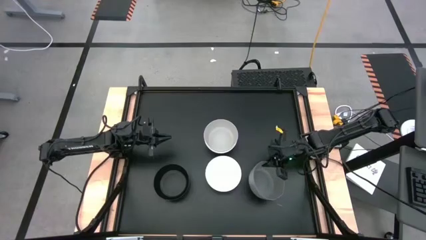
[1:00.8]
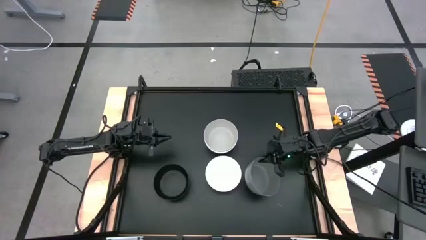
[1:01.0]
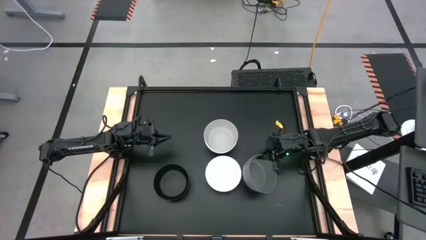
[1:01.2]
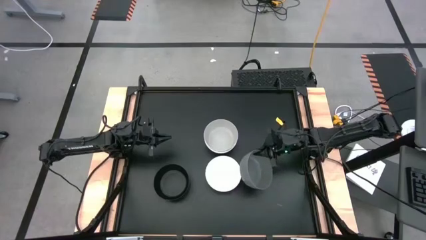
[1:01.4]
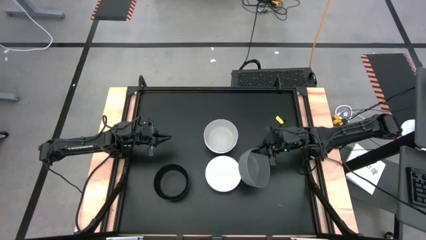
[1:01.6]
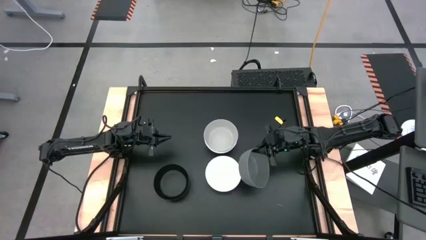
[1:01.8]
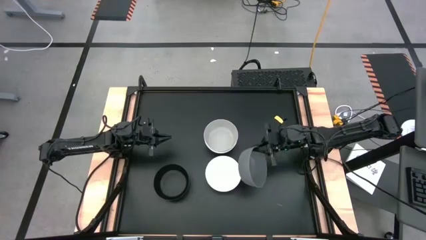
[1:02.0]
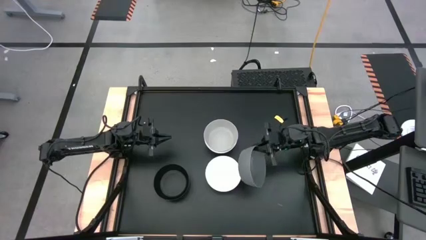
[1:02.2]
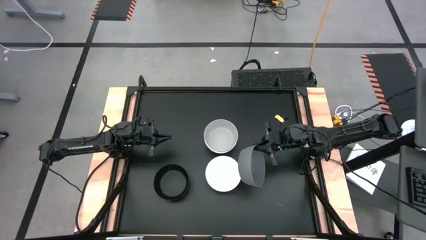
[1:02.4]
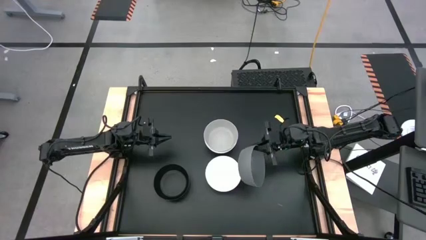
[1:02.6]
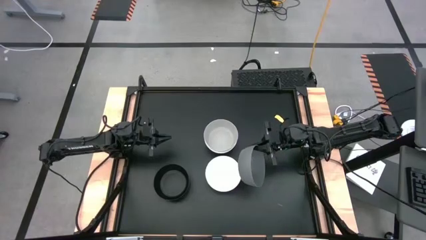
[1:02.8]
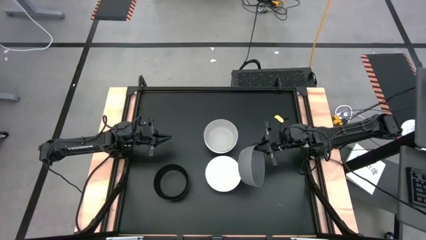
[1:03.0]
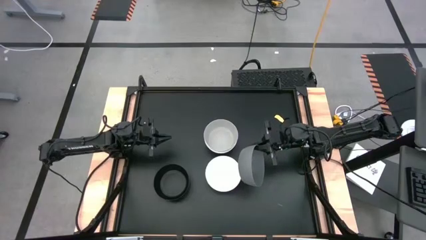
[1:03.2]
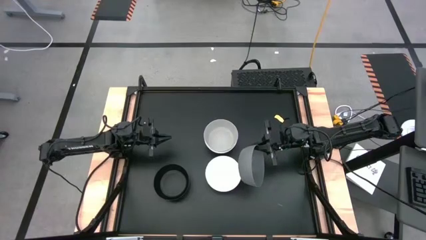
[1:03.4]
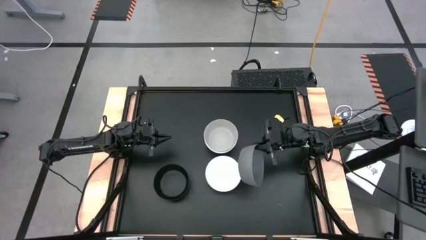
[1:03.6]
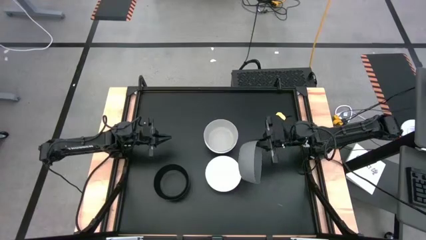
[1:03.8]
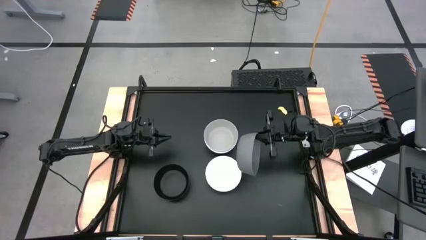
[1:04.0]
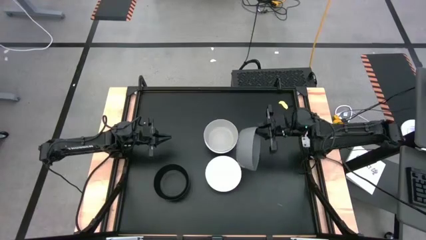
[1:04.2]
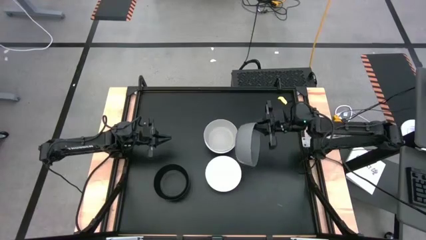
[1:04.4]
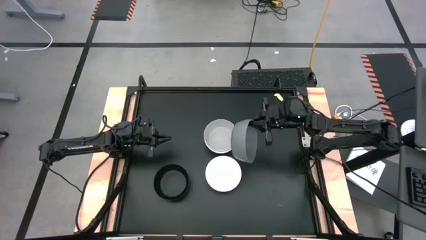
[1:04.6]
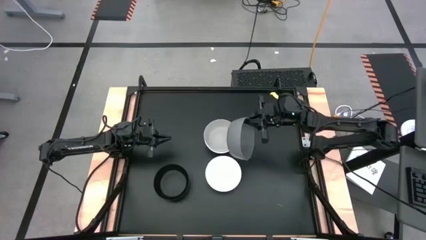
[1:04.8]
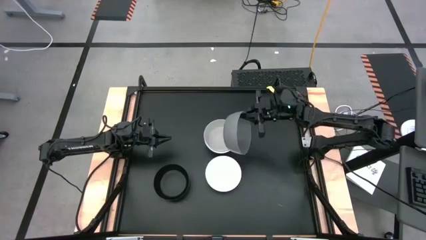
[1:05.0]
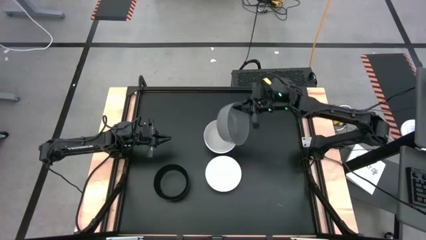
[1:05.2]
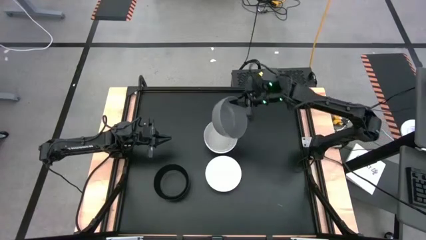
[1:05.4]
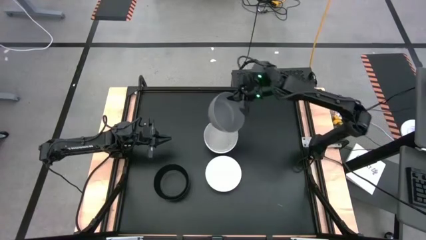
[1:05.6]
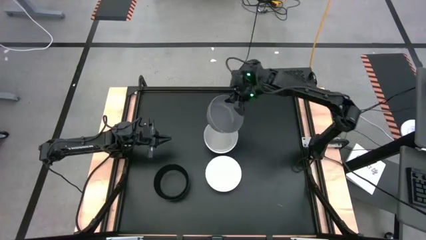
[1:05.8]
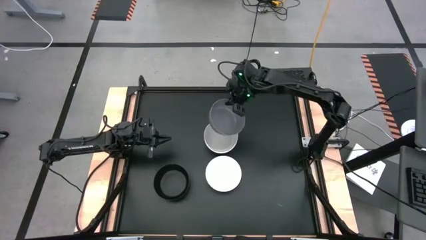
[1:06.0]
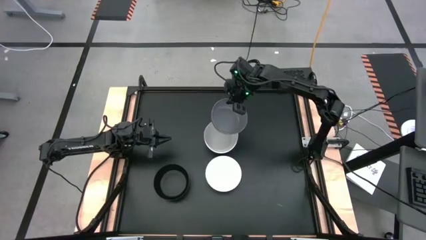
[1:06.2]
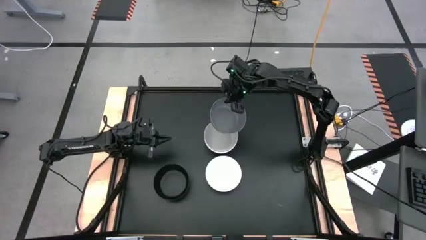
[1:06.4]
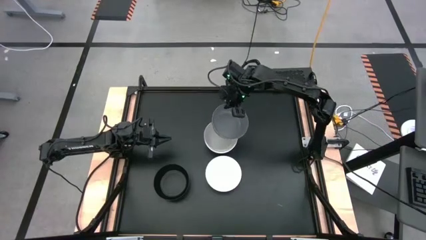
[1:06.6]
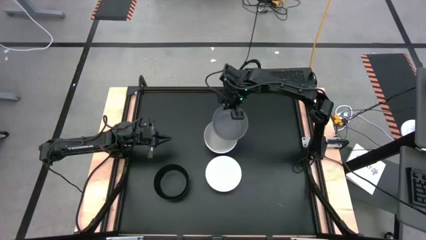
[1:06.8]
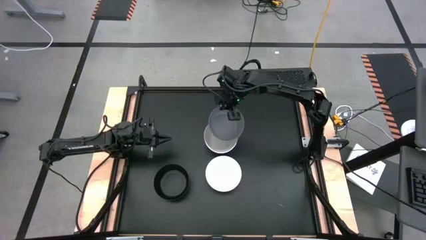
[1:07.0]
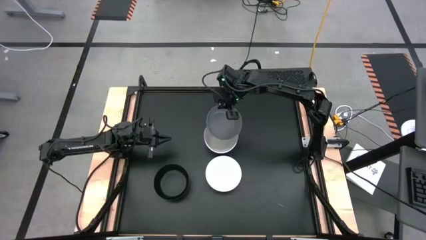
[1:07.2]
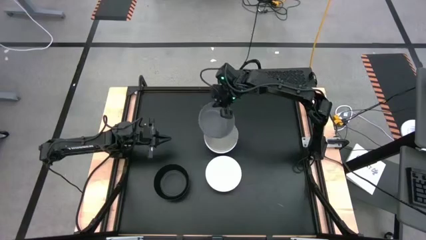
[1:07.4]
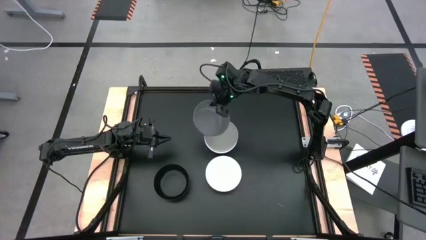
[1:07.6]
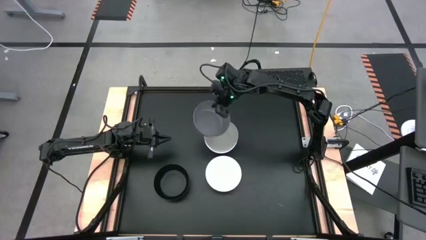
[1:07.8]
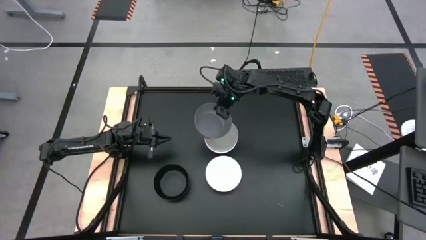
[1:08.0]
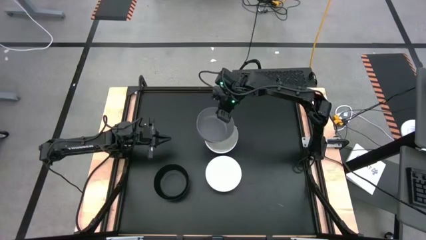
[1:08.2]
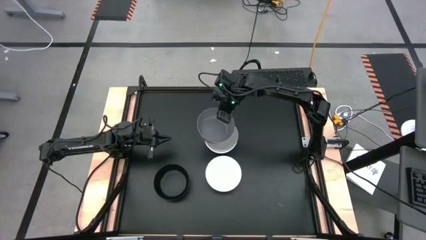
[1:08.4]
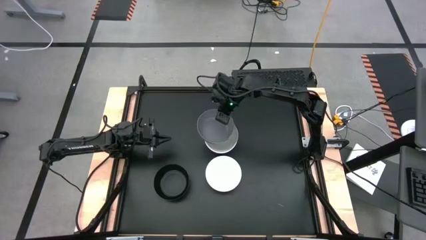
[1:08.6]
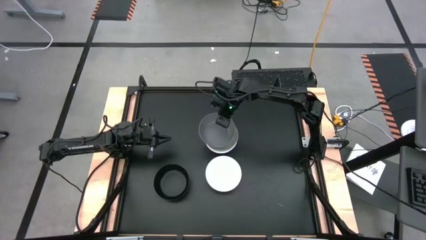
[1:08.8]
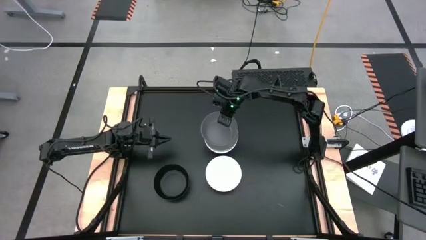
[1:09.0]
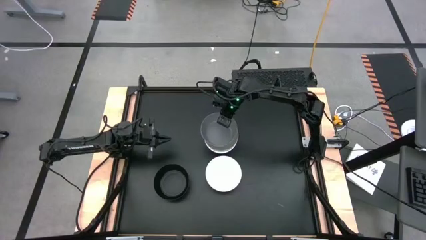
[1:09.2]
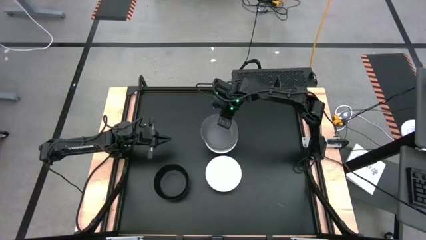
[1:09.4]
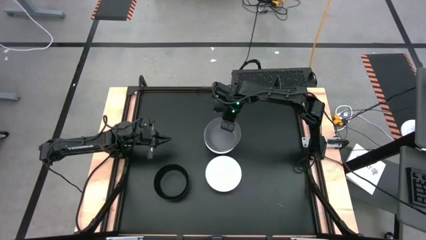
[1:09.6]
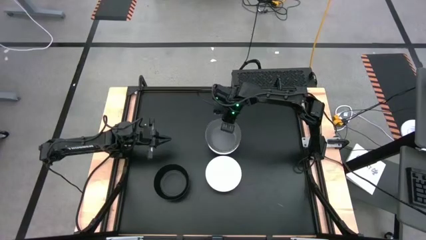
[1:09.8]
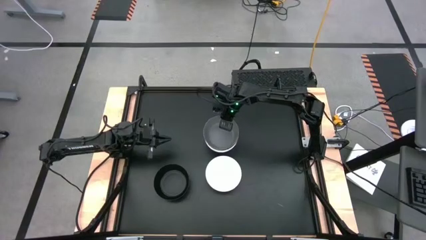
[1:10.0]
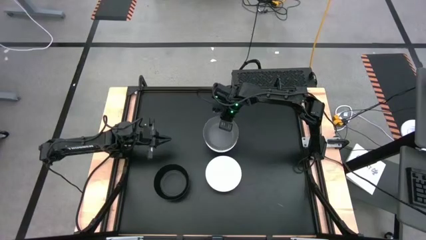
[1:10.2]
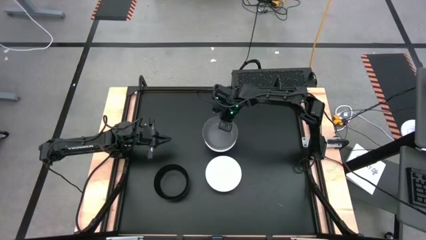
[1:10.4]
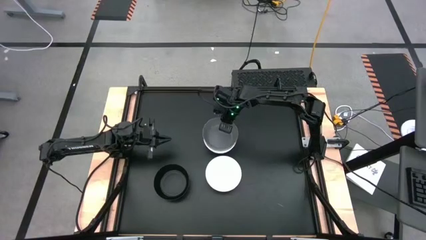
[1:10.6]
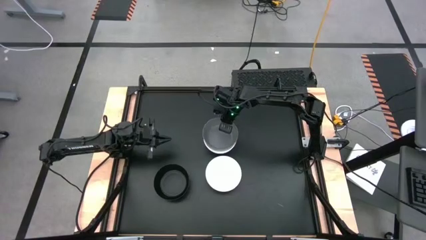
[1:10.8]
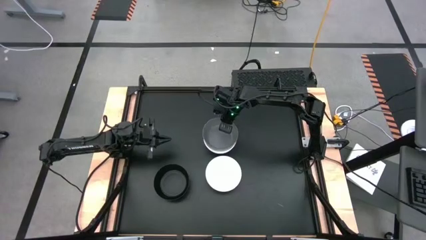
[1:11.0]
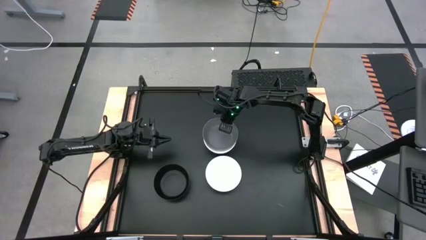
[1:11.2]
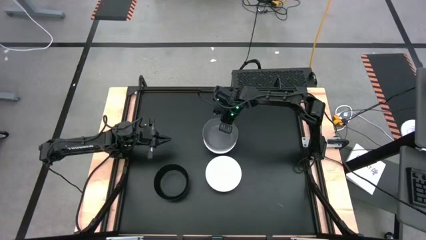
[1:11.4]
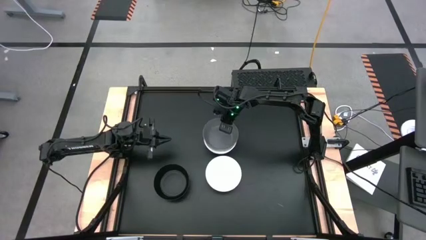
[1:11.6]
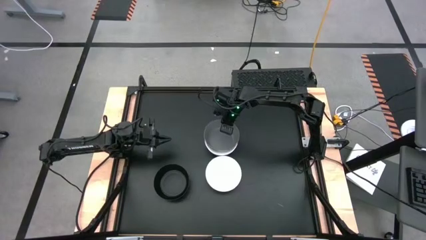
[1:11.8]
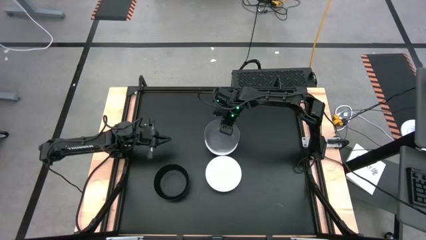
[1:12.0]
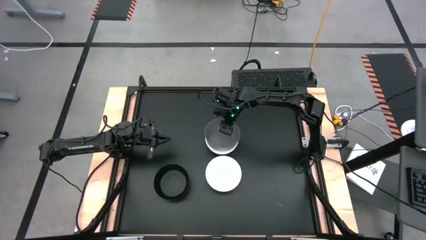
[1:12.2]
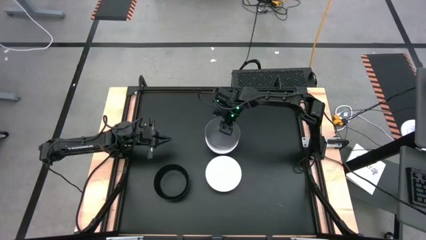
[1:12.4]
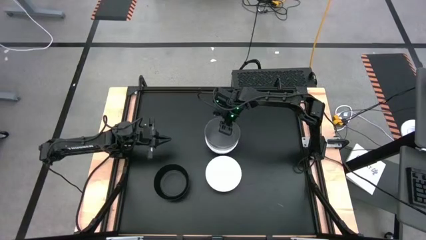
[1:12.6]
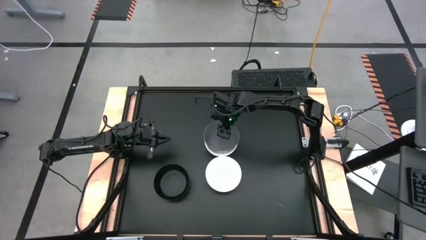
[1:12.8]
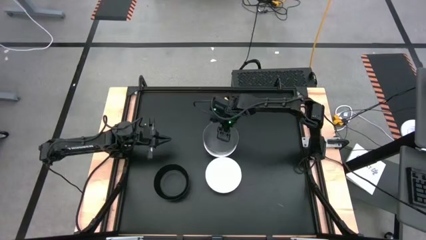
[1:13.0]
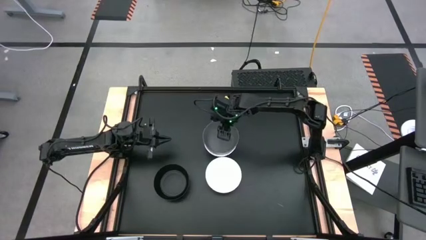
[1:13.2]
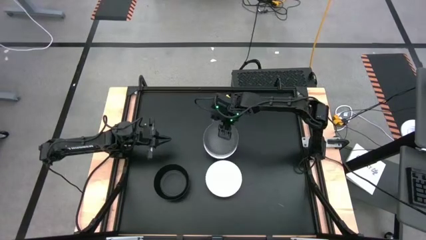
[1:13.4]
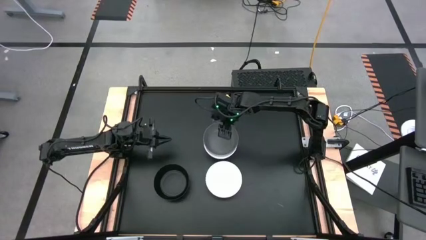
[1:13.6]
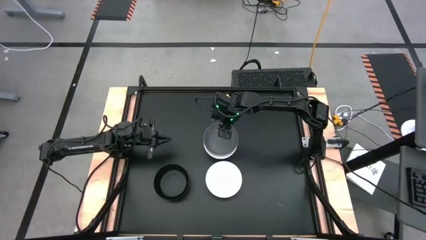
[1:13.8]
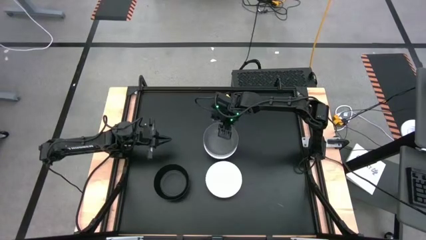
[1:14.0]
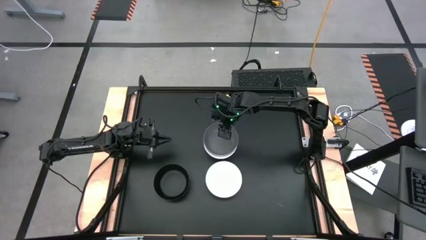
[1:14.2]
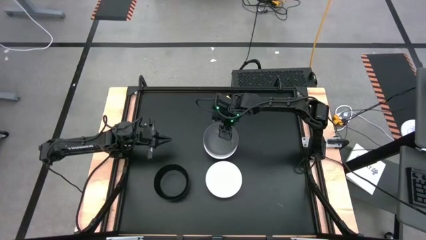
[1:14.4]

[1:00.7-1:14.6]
Task: Nest bowls inside each other
Stack the dark grey bowl on top of the light grey bowl
